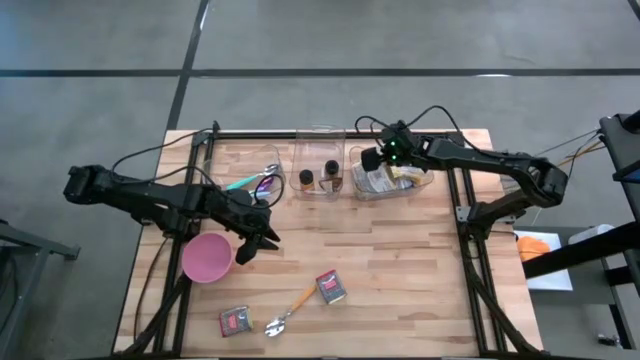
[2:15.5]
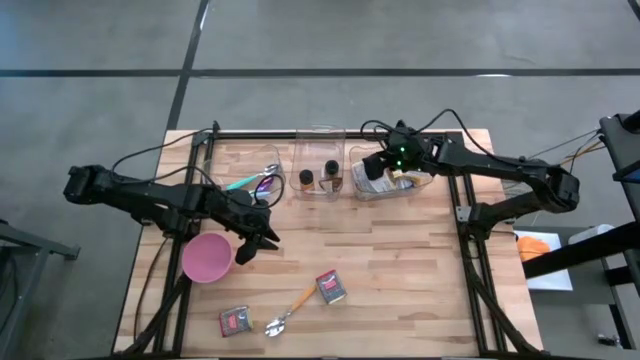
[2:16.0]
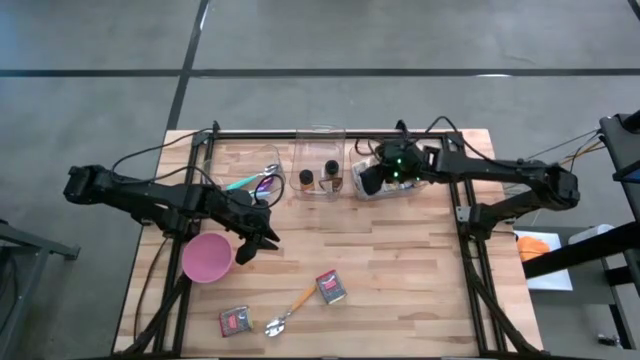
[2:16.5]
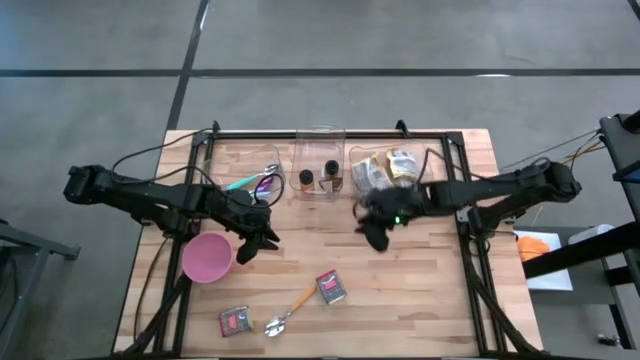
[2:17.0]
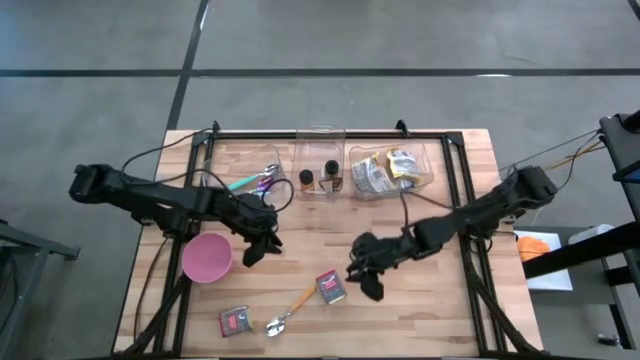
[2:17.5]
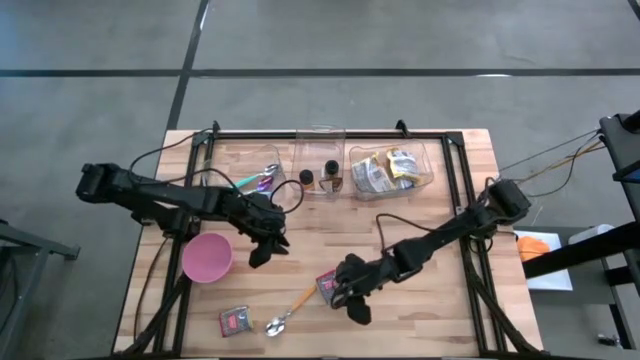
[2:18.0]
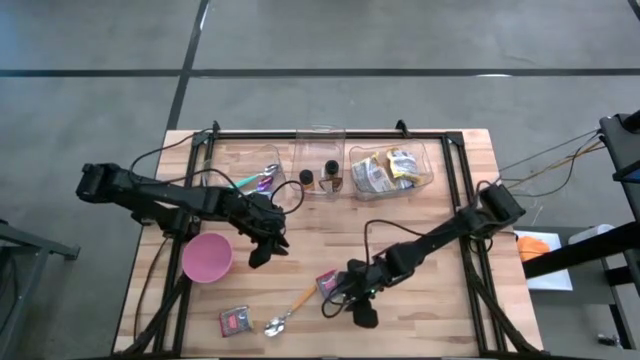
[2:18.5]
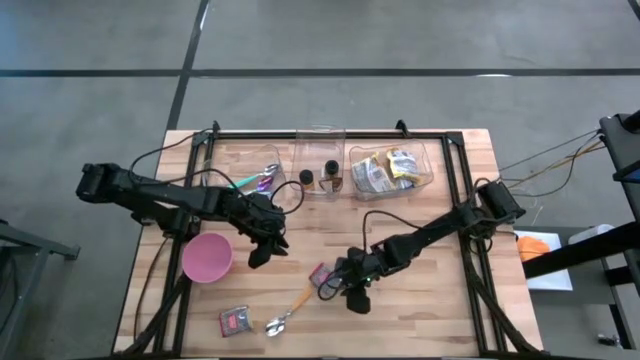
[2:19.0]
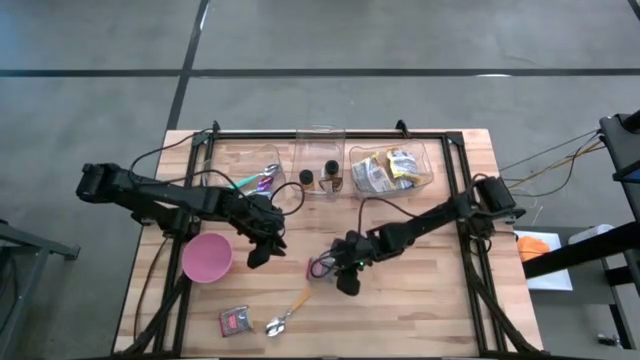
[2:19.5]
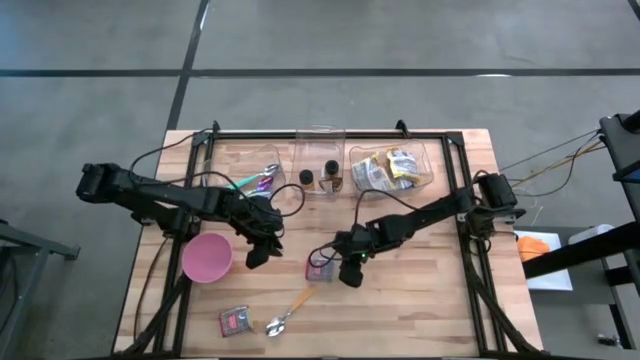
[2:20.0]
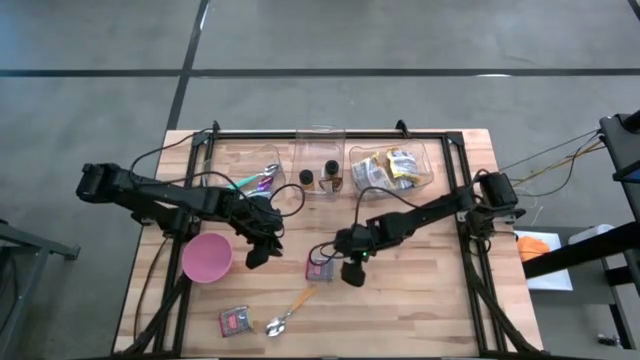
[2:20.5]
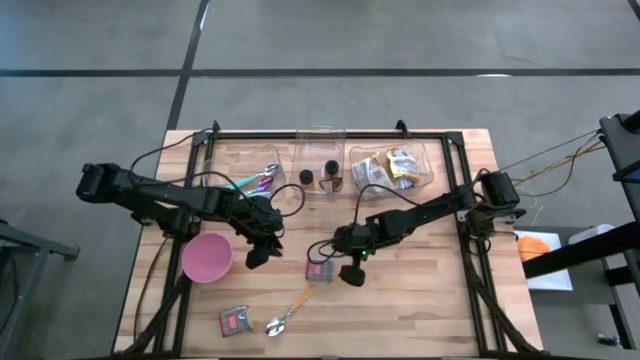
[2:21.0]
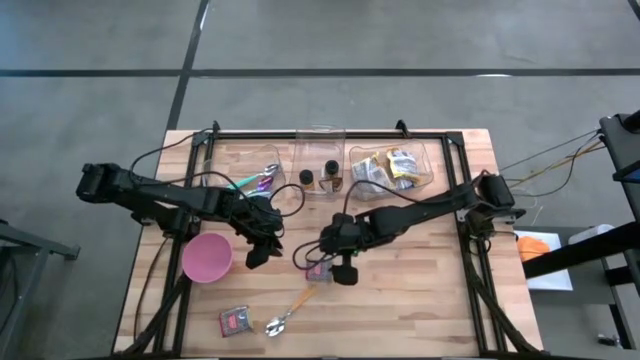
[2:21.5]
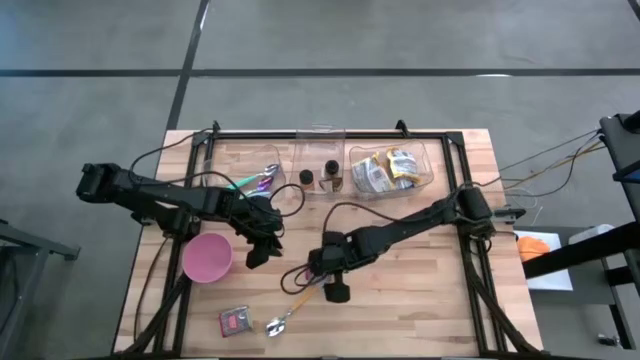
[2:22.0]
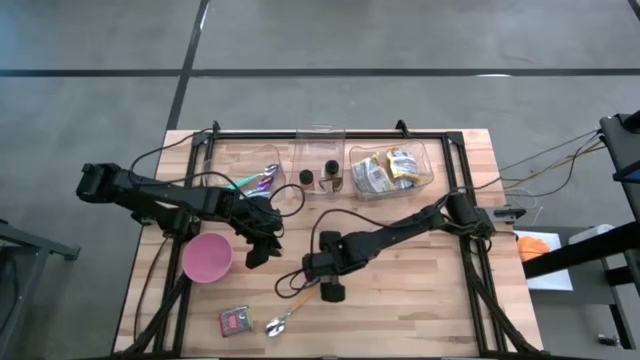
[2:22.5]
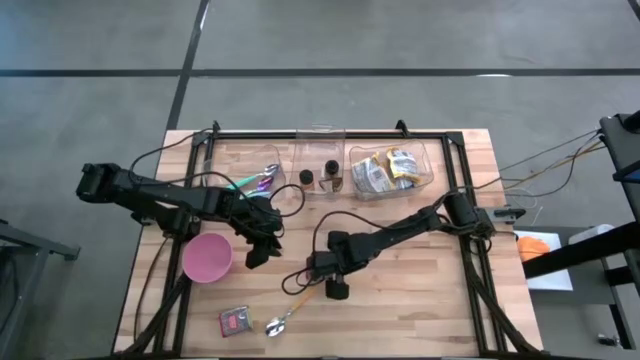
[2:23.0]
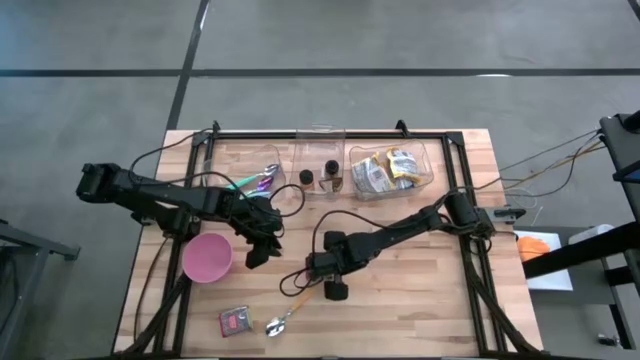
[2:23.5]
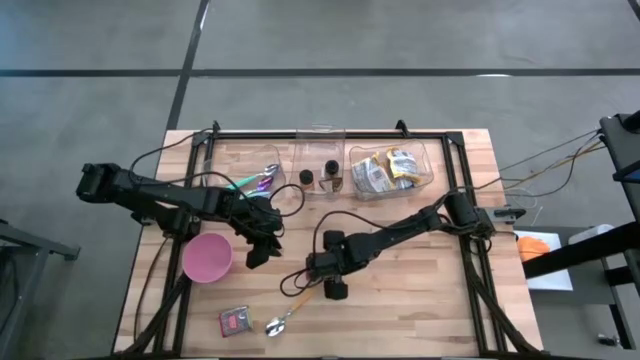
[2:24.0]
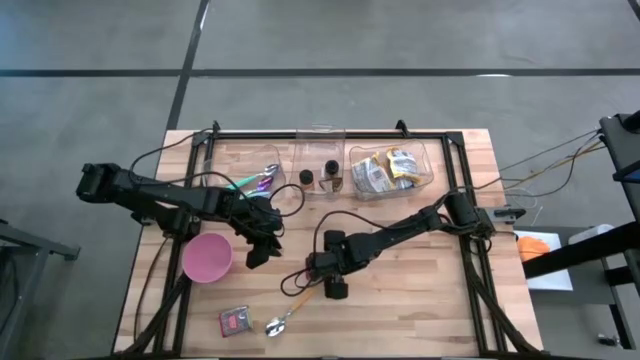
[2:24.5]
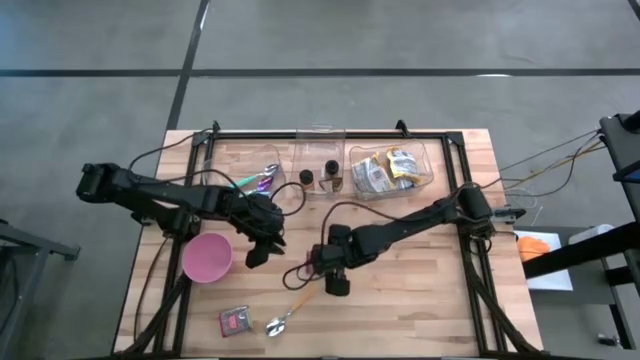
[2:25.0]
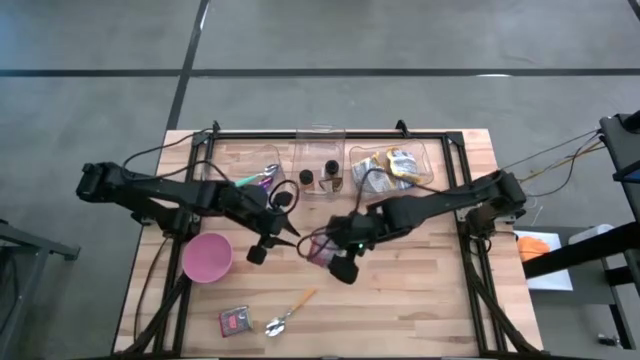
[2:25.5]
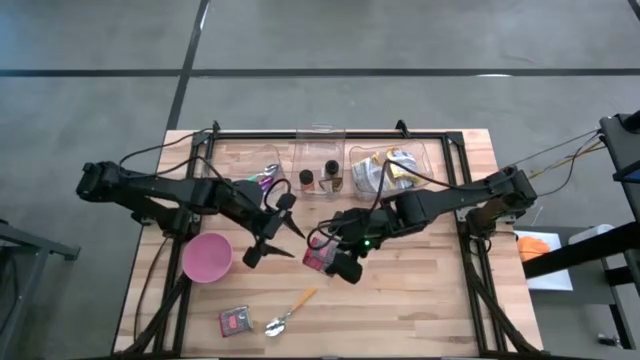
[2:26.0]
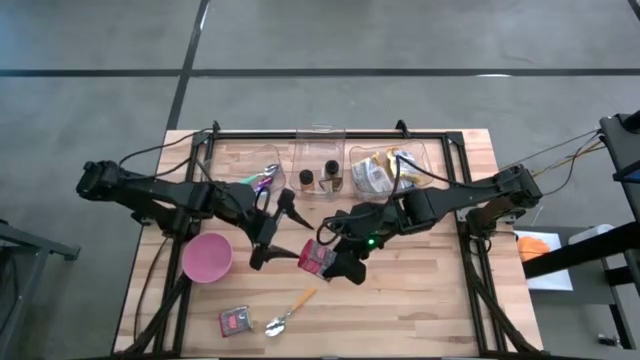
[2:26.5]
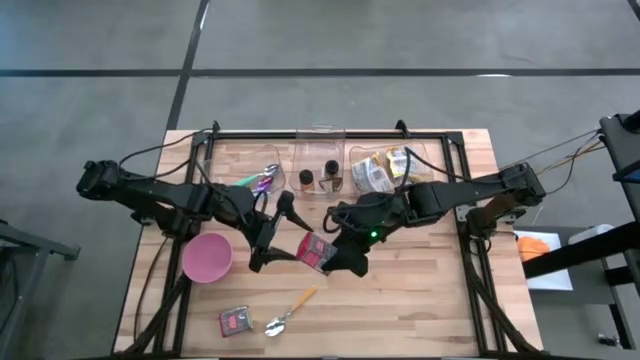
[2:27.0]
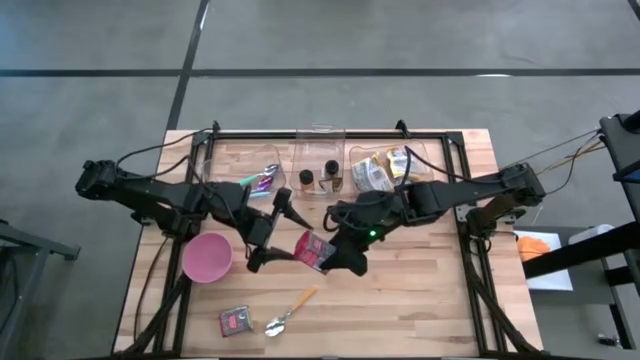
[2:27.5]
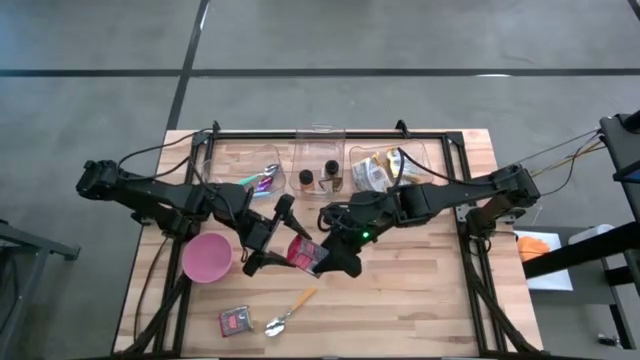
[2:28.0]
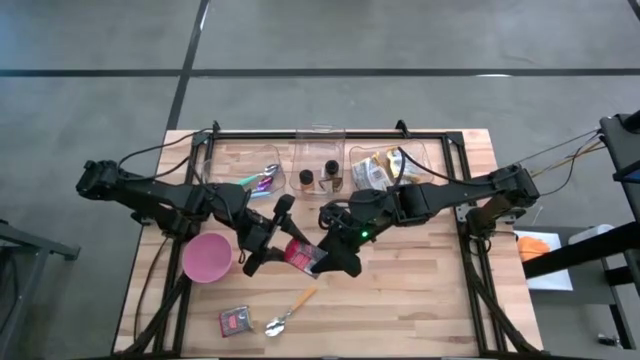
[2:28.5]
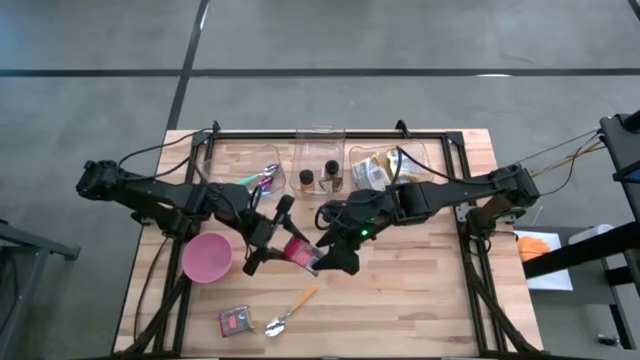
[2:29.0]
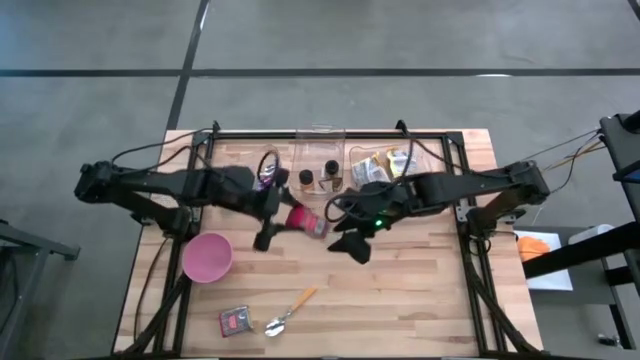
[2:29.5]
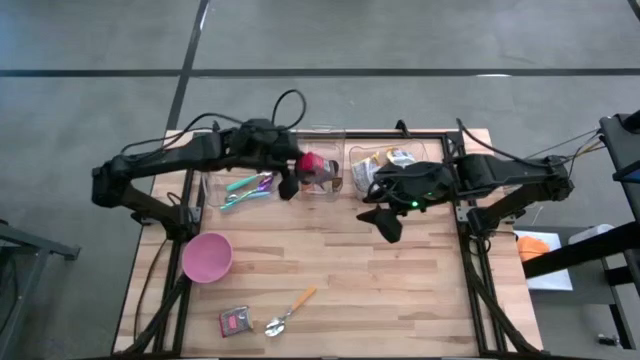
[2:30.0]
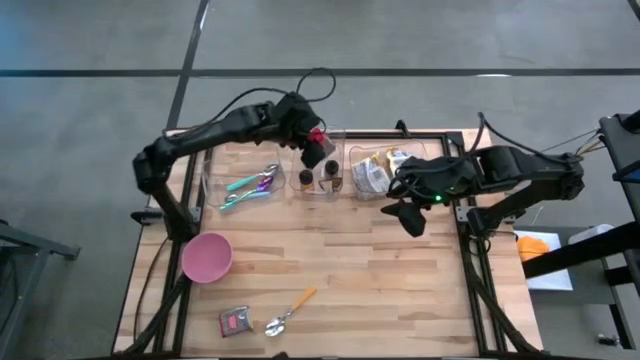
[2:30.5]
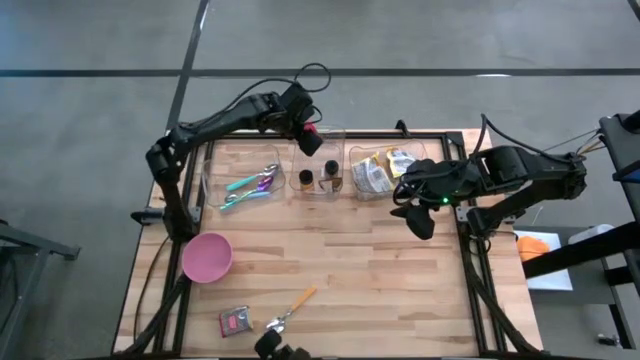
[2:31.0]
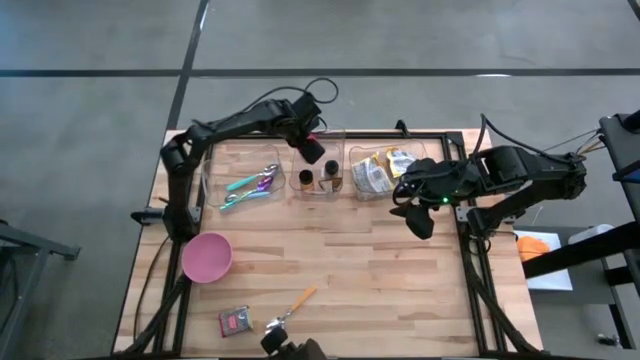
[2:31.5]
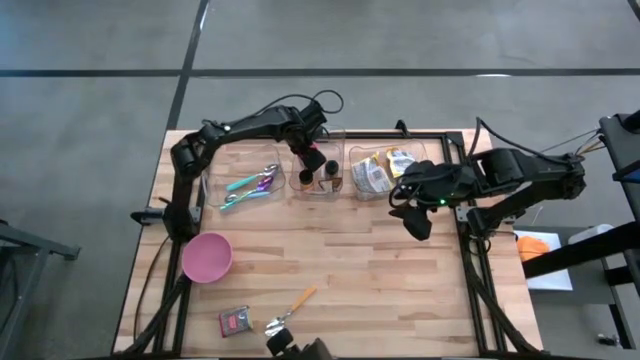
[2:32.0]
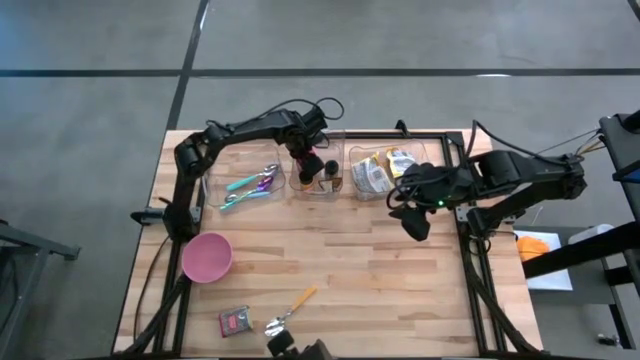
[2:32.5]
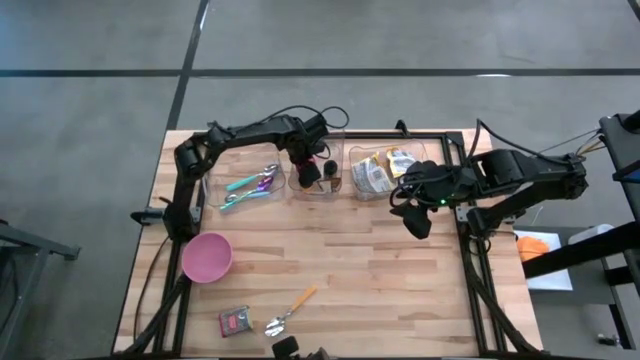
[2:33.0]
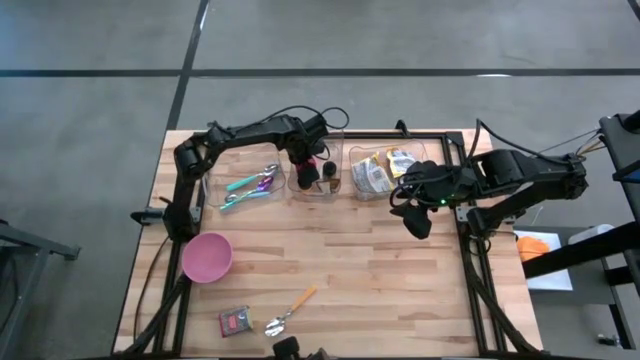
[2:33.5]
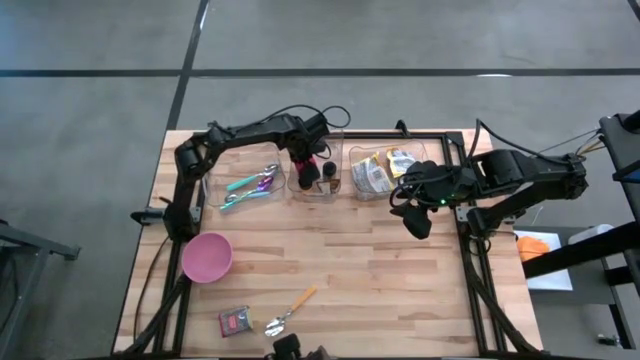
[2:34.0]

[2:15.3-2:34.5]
Put the right red seasoning can into the middle transparent bin
